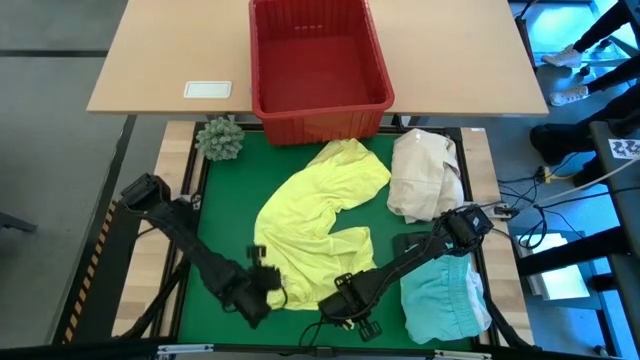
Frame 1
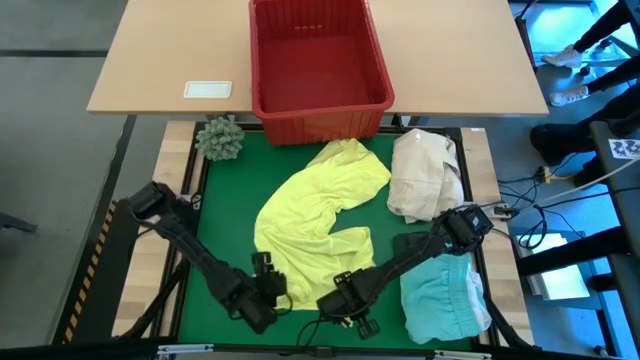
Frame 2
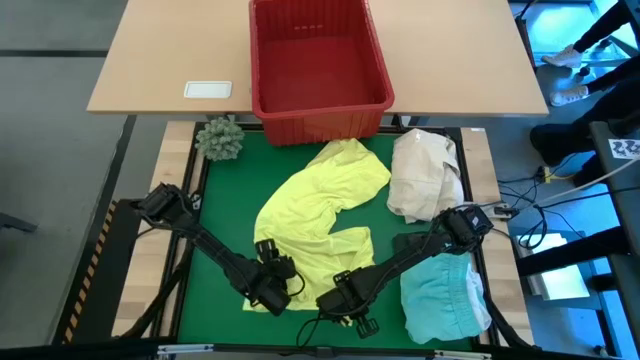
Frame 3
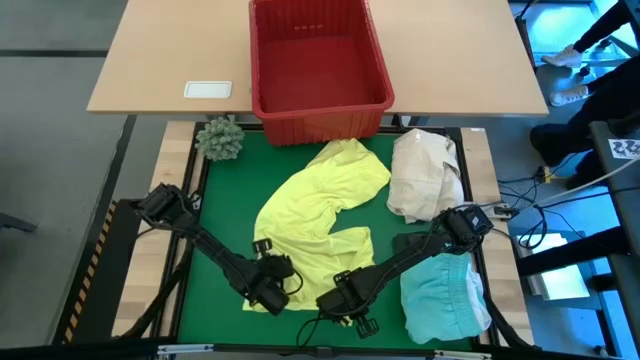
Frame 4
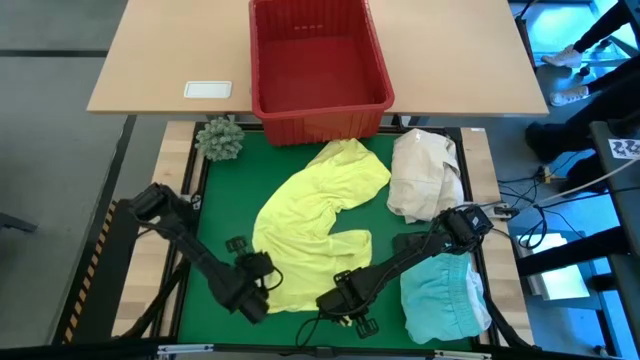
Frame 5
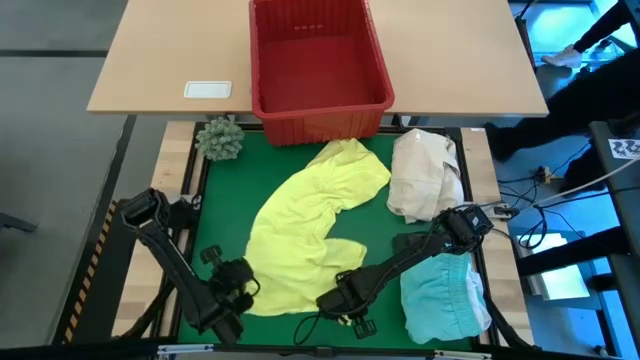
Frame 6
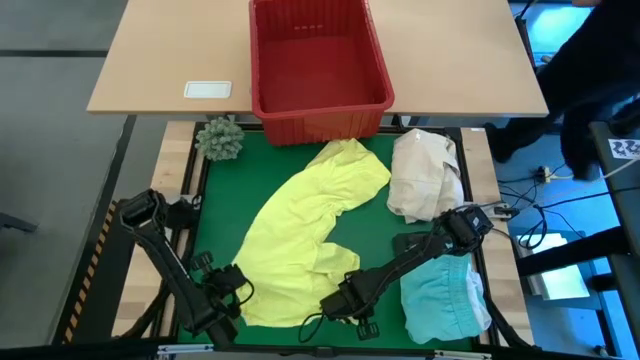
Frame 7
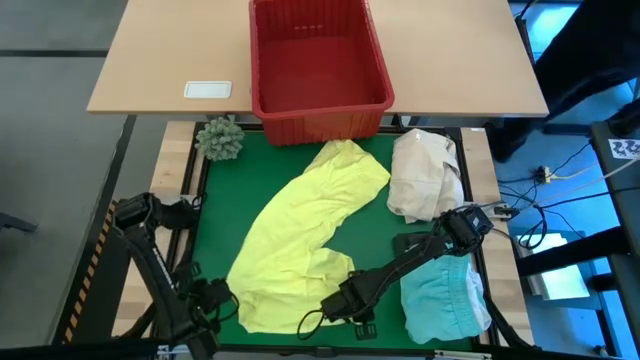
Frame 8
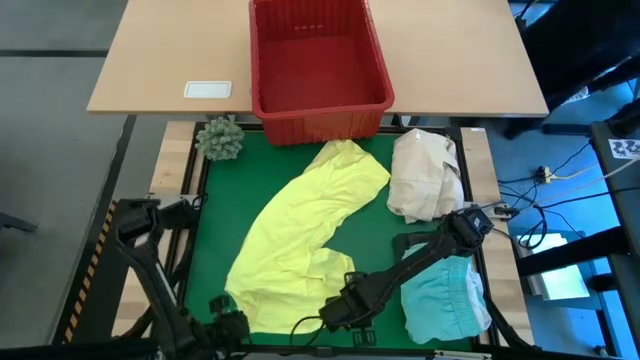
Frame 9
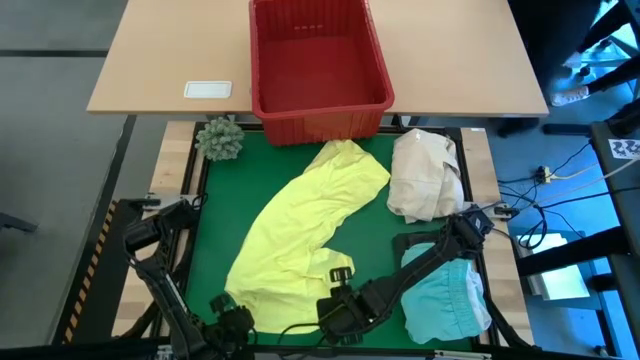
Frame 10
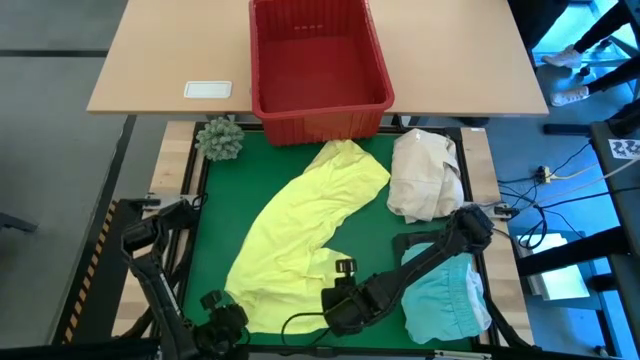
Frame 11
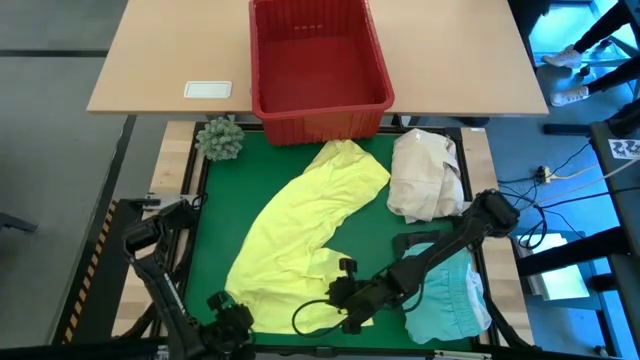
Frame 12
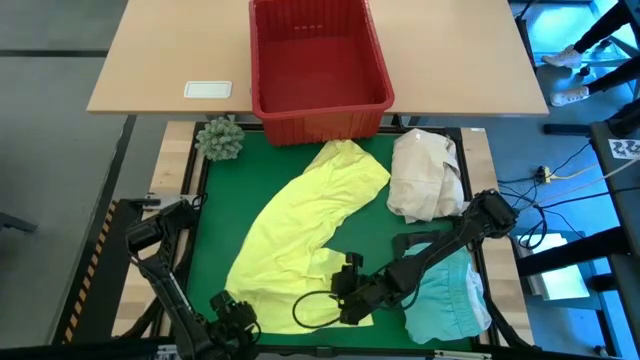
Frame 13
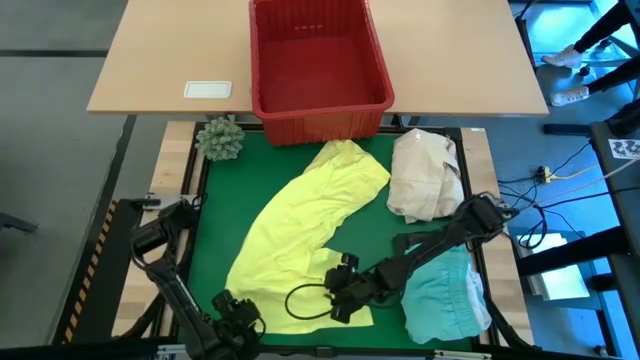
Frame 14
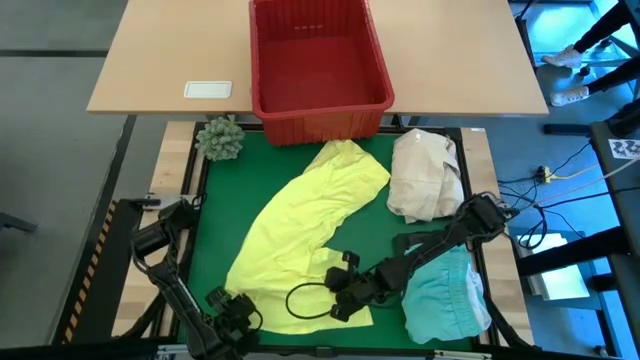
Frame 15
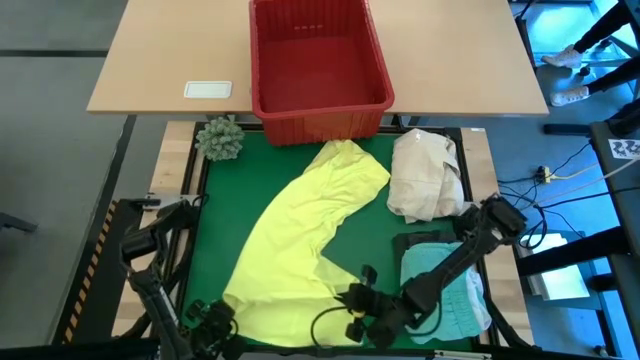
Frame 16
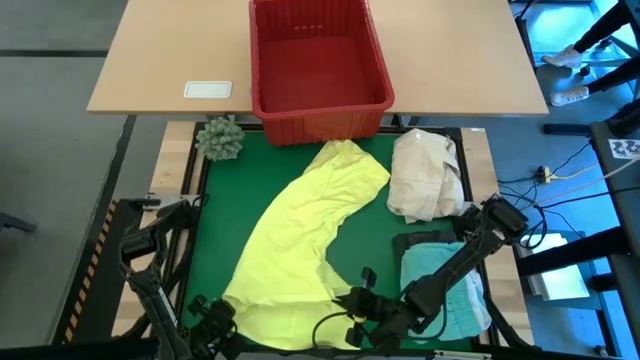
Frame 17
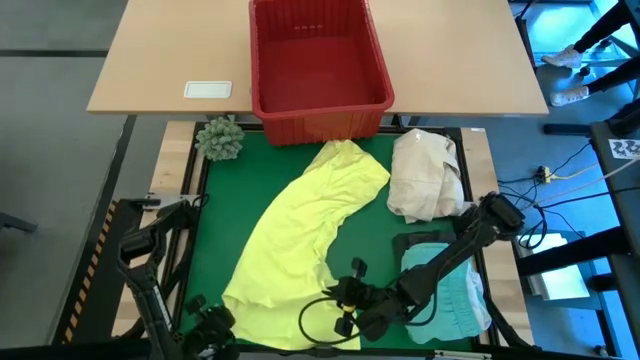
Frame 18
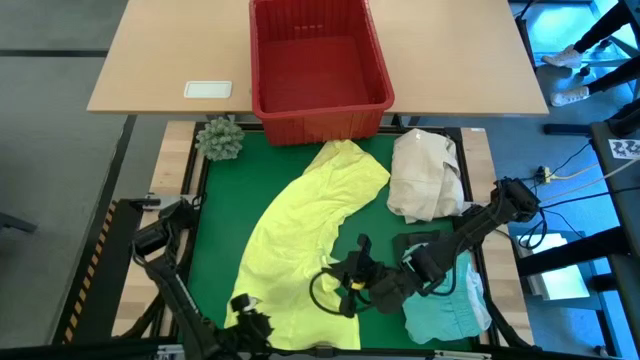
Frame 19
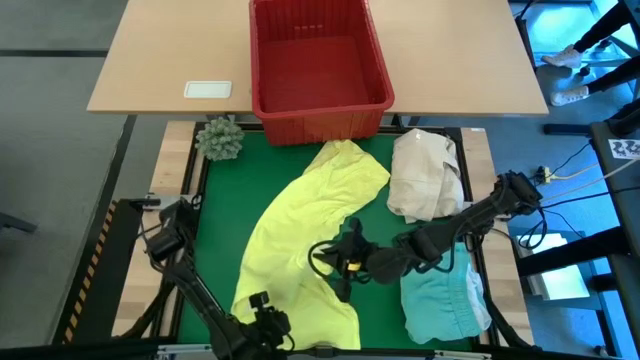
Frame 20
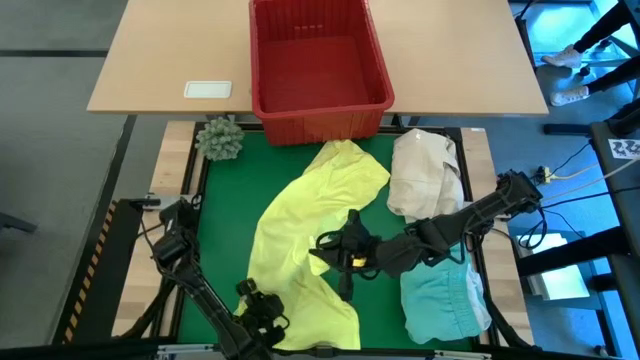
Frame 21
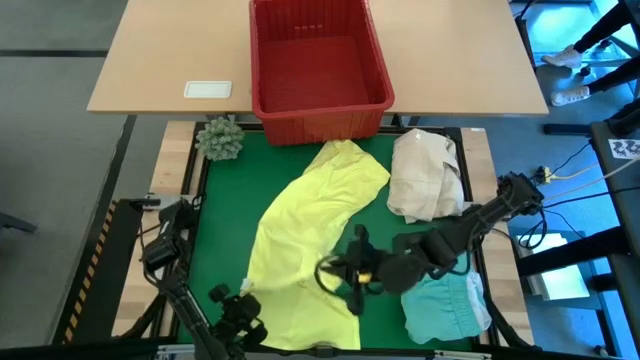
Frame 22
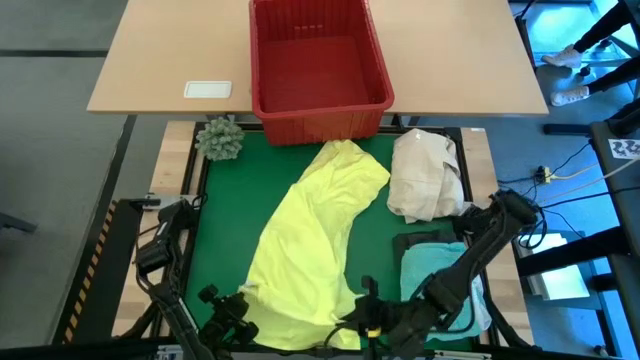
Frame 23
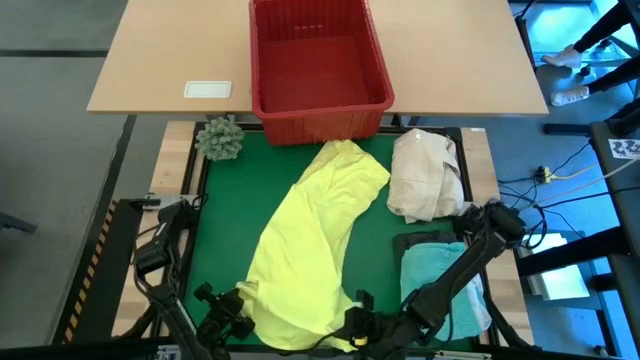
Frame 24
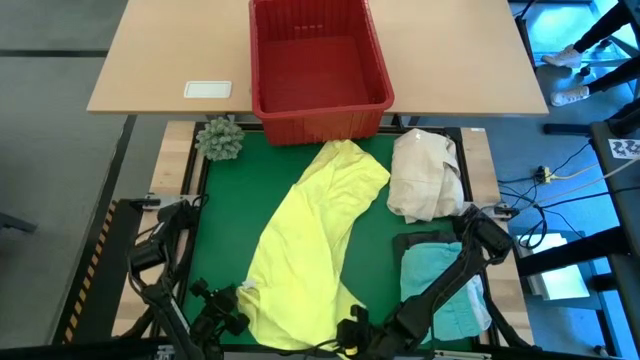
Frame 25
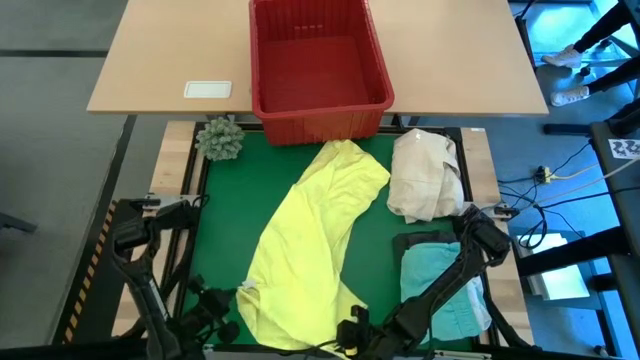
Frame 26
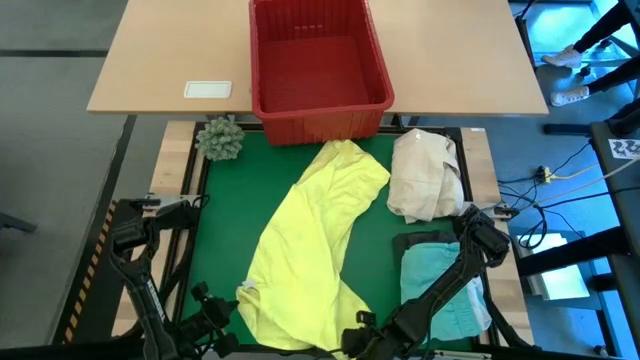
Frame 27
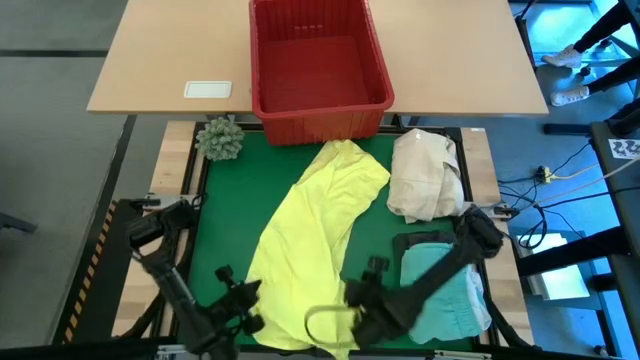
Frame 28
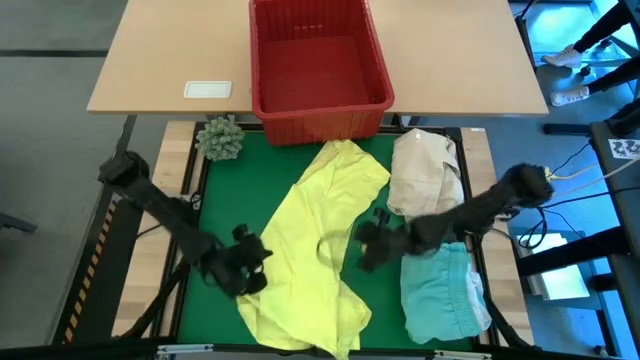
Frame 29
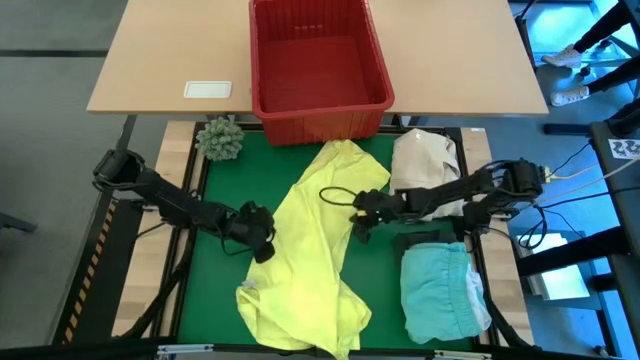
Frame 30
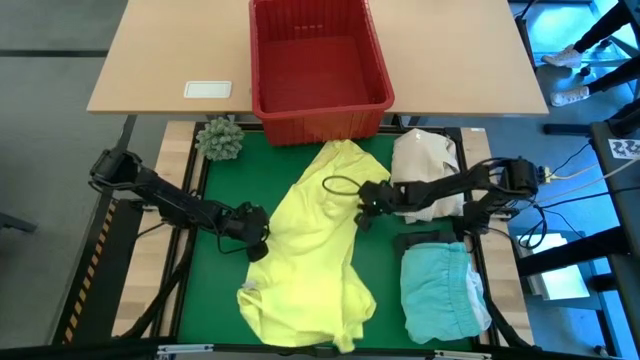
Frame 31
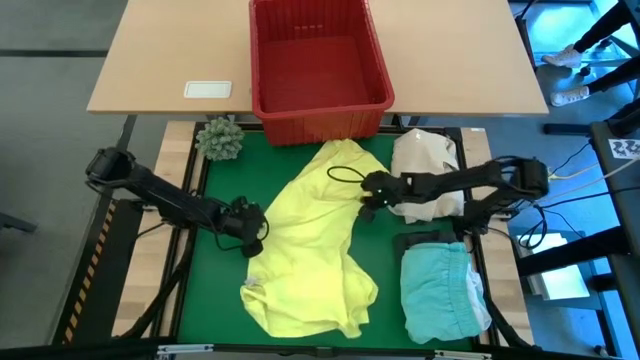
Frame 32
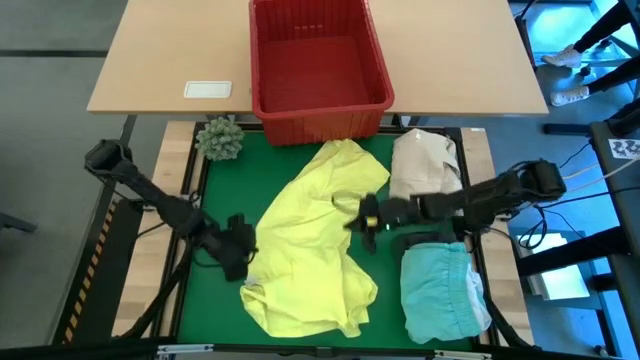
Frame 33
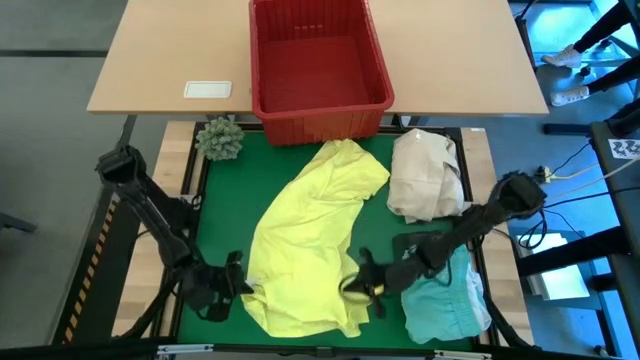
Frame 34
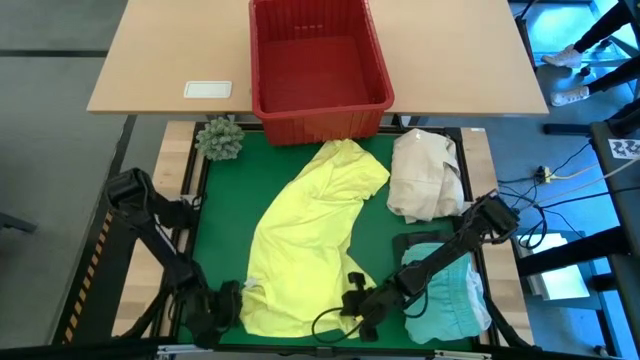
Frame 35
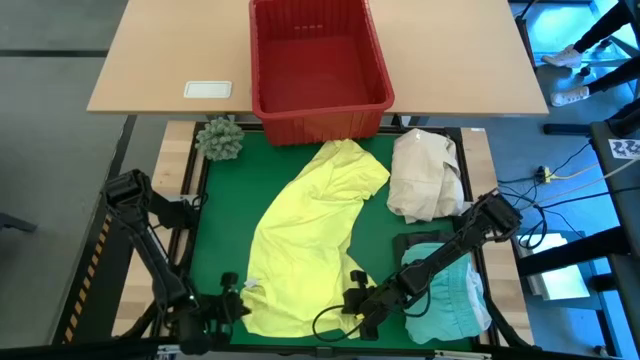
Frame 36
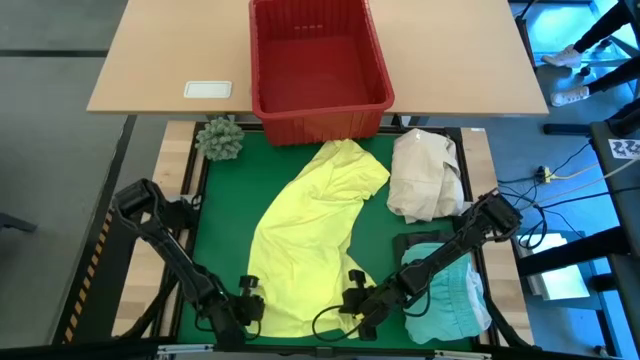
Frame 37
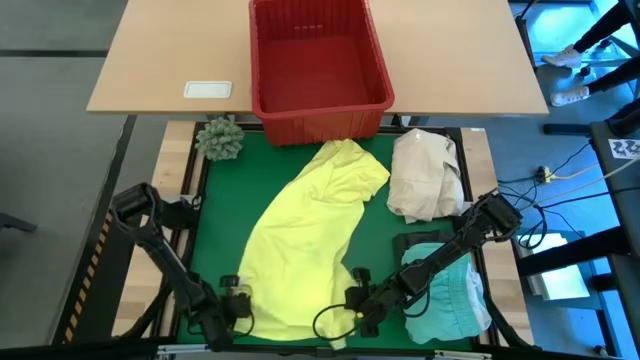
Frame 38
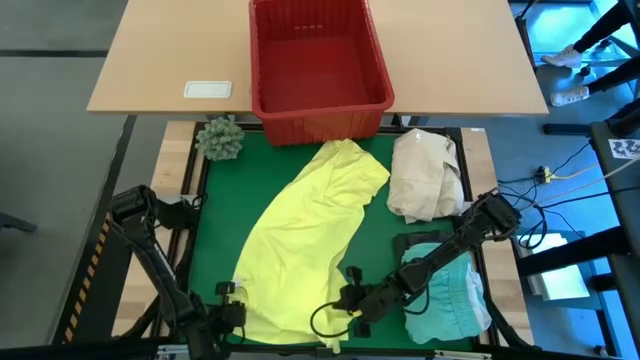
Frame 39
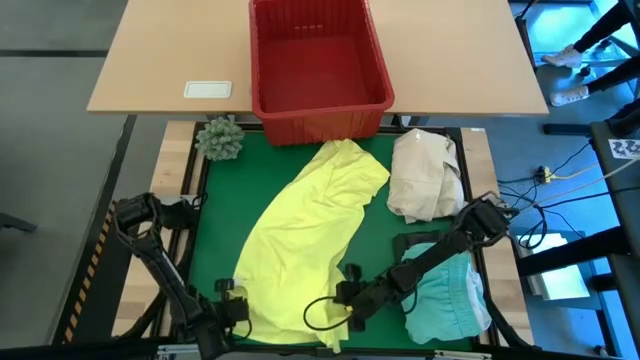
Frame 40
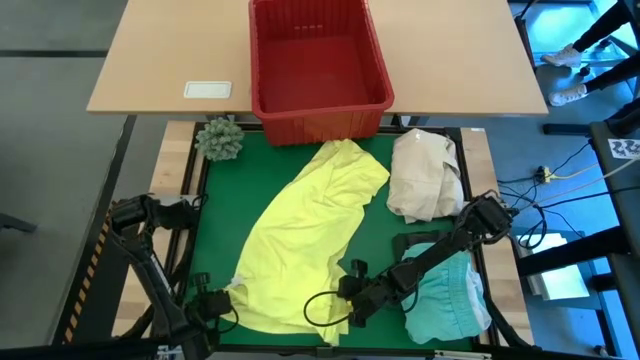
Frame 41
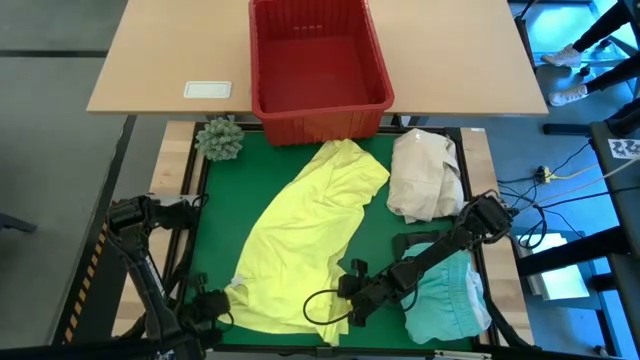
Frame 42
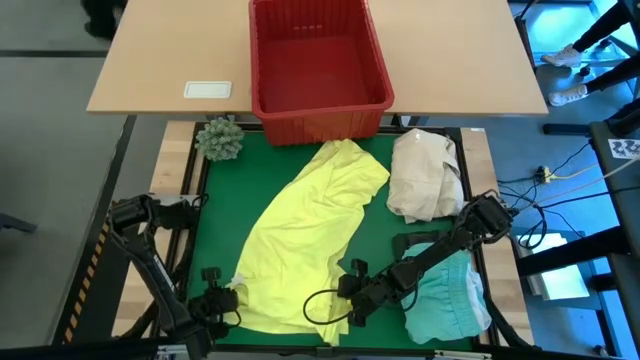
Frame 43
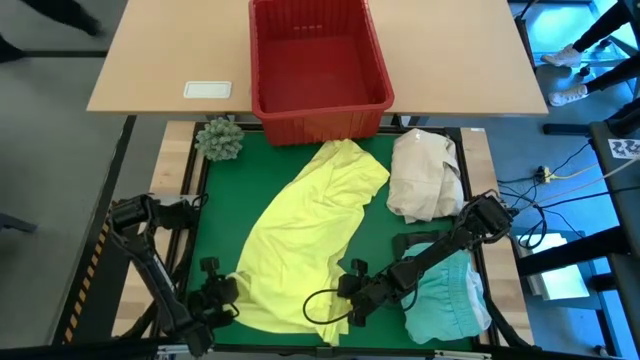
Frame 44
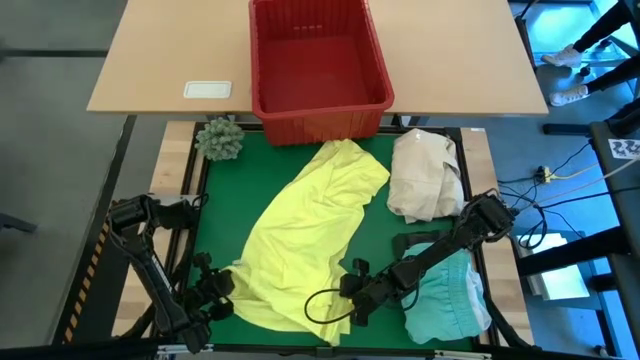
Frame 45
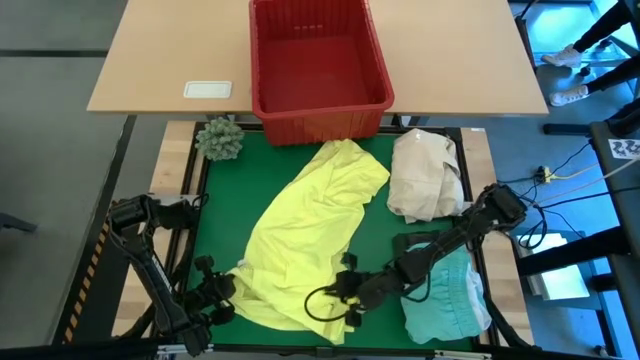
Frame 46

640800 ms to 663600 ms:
Task: Fold Laundry from Bin
Fold the yellow shirt
